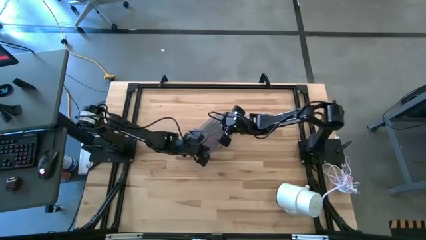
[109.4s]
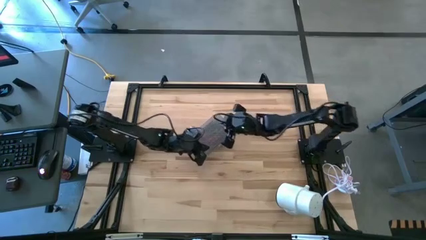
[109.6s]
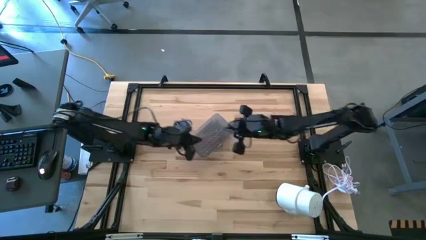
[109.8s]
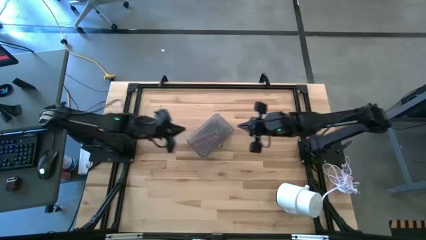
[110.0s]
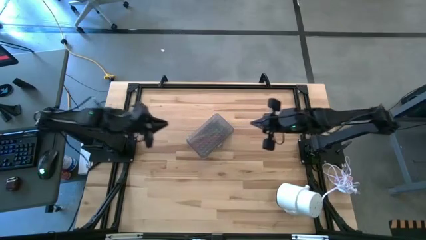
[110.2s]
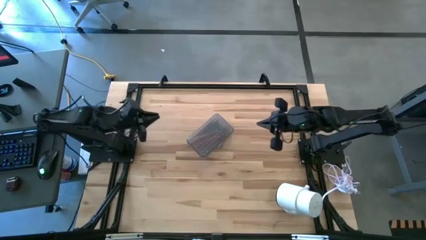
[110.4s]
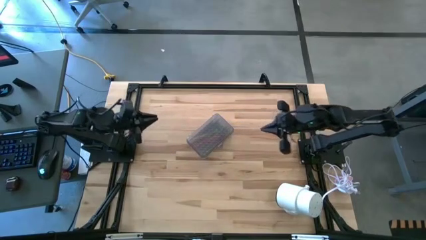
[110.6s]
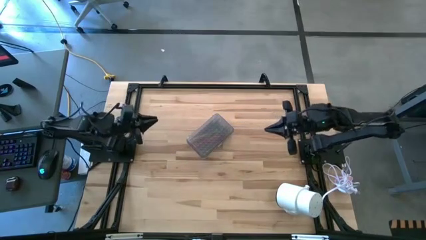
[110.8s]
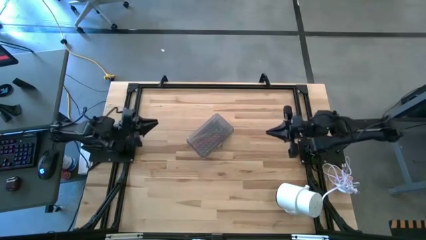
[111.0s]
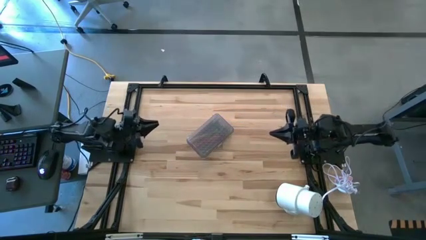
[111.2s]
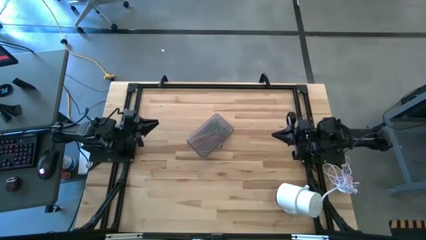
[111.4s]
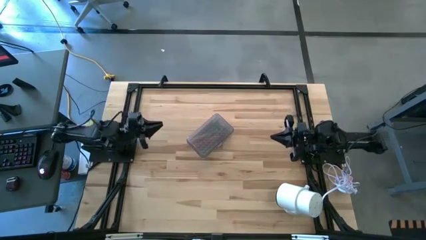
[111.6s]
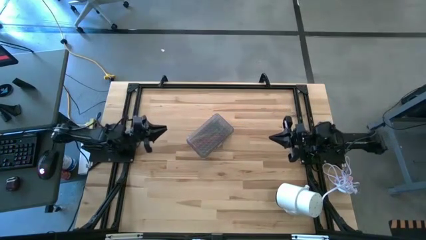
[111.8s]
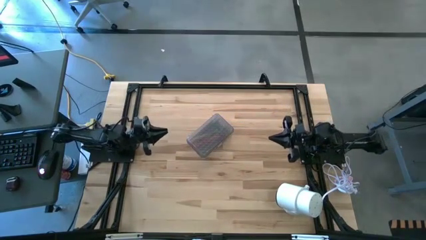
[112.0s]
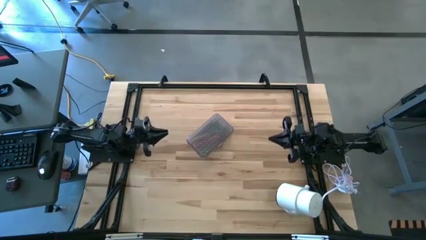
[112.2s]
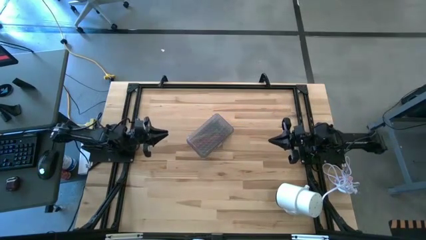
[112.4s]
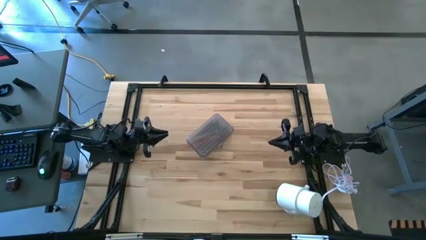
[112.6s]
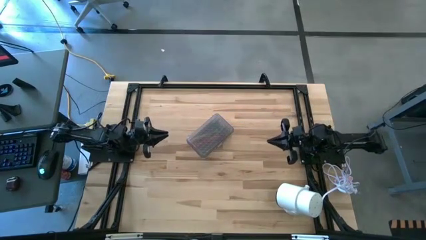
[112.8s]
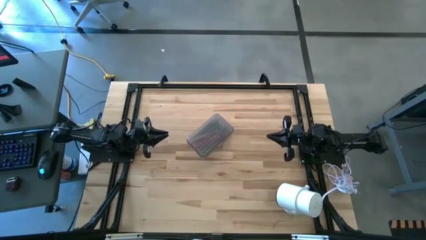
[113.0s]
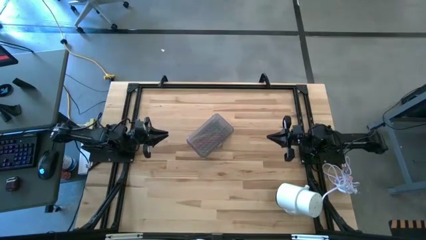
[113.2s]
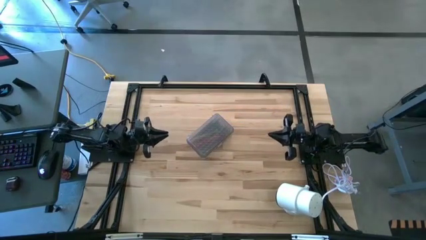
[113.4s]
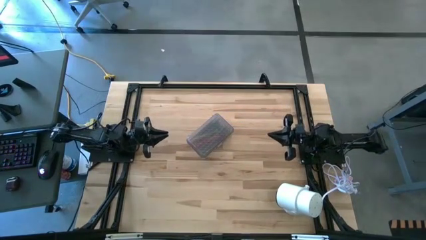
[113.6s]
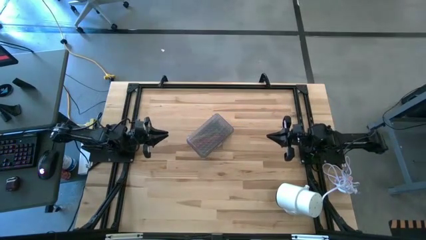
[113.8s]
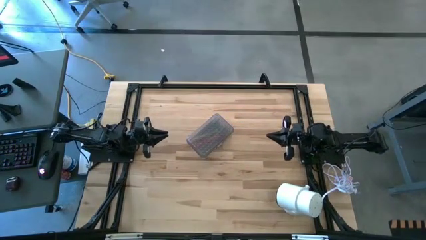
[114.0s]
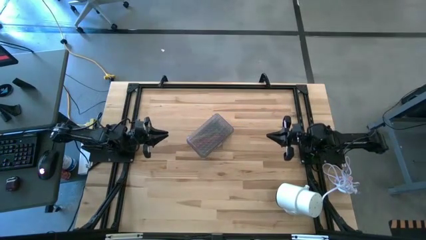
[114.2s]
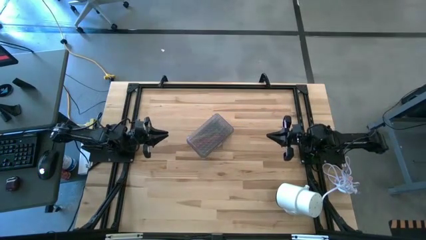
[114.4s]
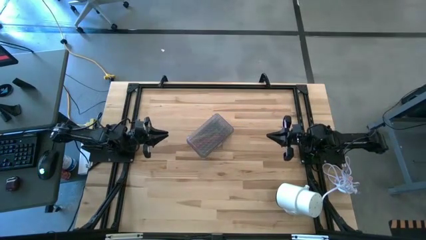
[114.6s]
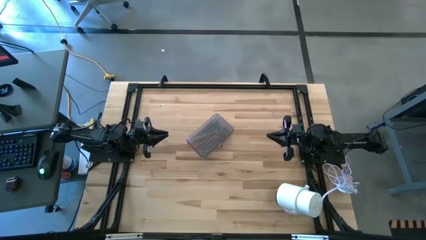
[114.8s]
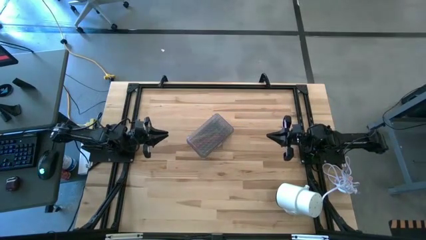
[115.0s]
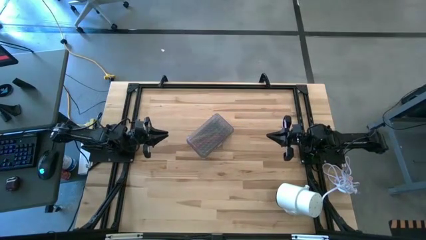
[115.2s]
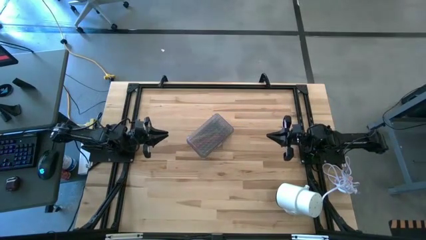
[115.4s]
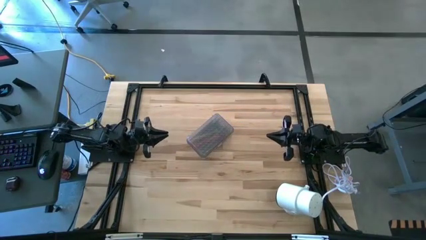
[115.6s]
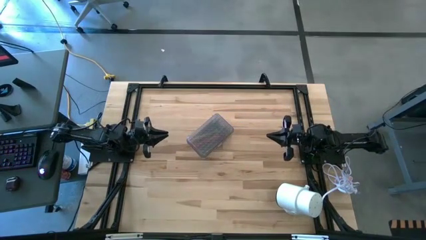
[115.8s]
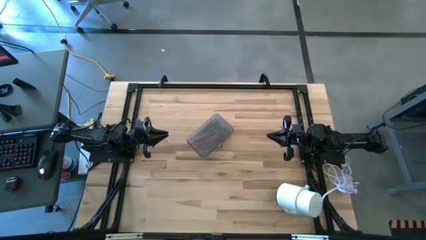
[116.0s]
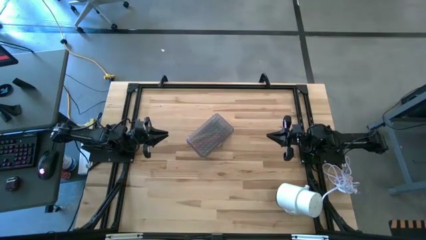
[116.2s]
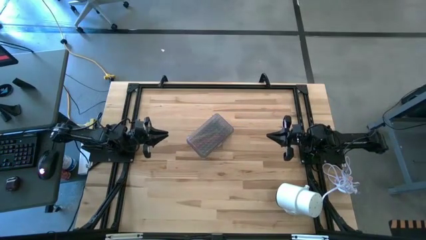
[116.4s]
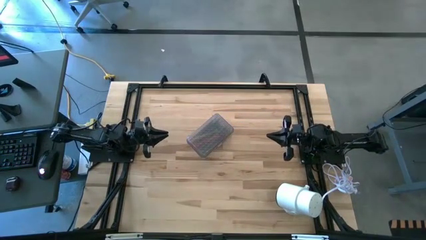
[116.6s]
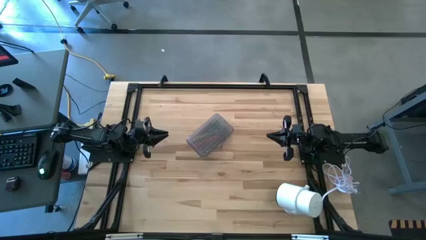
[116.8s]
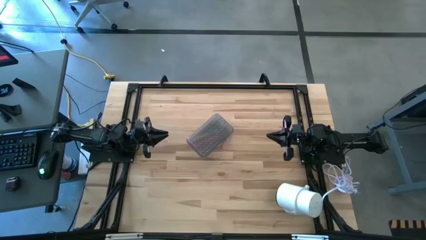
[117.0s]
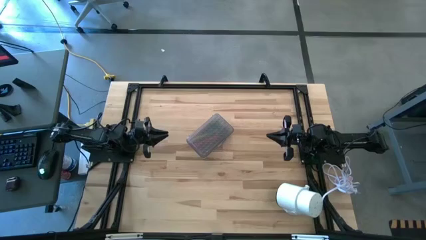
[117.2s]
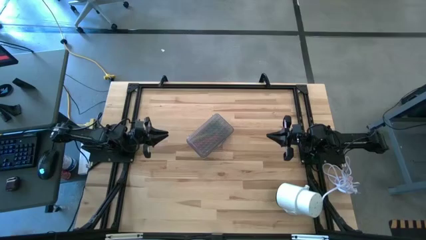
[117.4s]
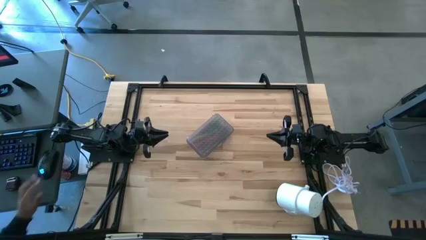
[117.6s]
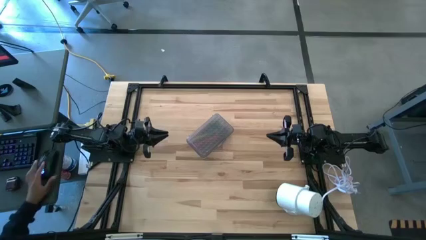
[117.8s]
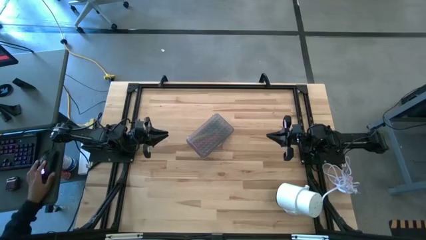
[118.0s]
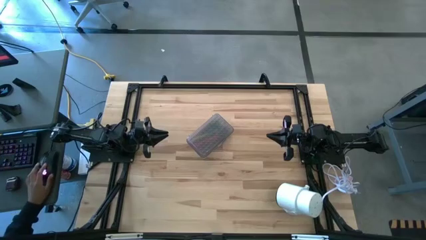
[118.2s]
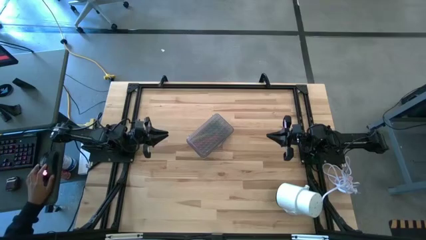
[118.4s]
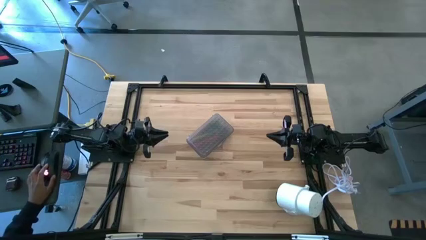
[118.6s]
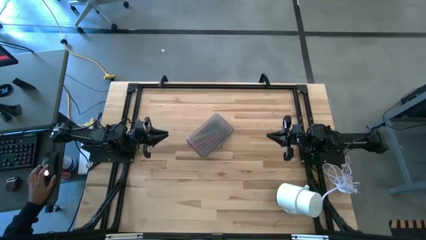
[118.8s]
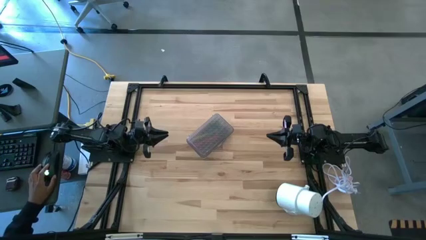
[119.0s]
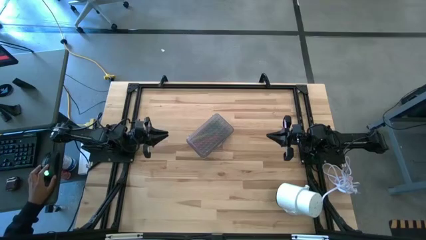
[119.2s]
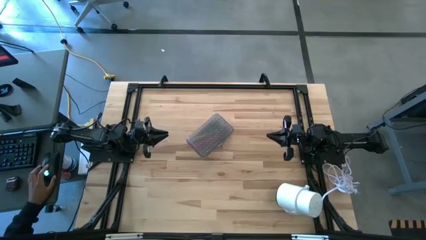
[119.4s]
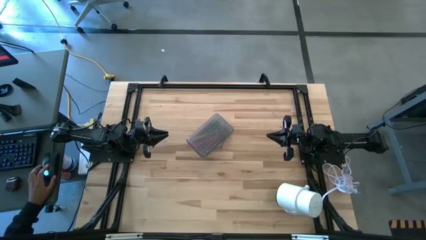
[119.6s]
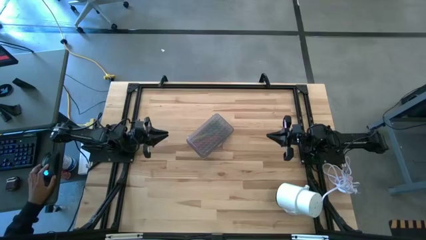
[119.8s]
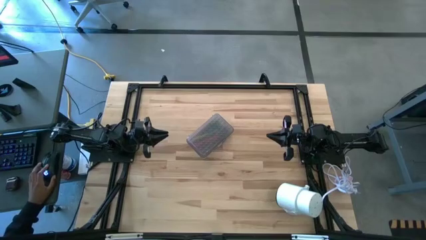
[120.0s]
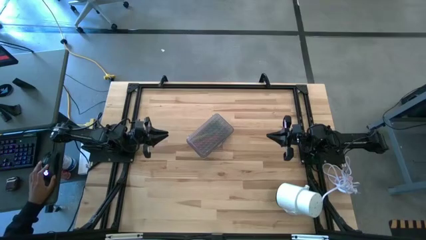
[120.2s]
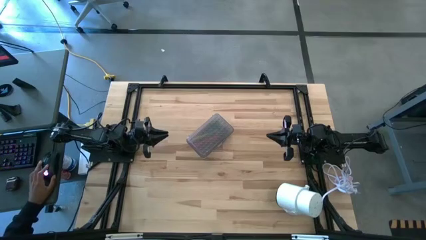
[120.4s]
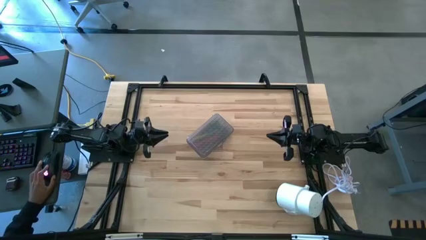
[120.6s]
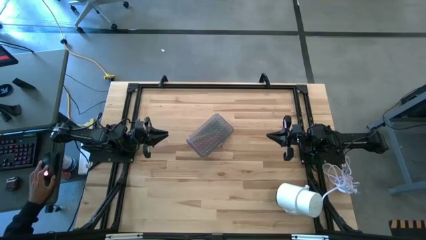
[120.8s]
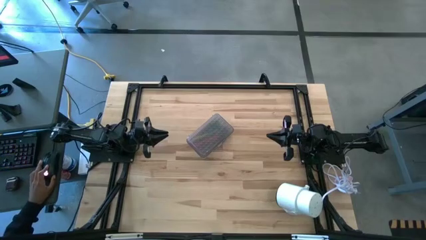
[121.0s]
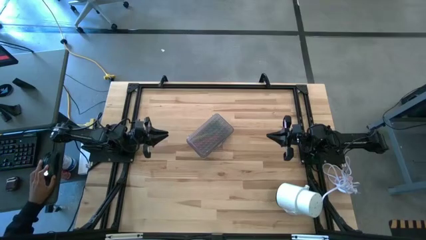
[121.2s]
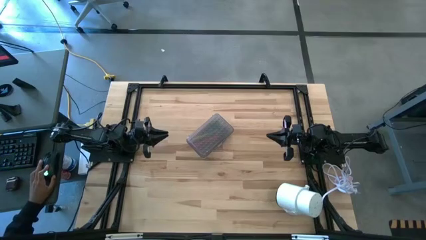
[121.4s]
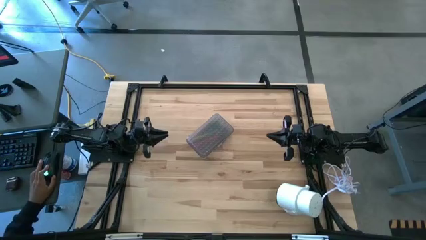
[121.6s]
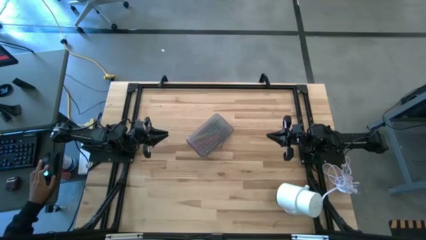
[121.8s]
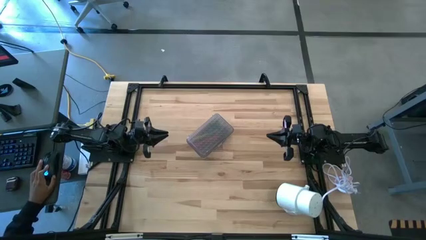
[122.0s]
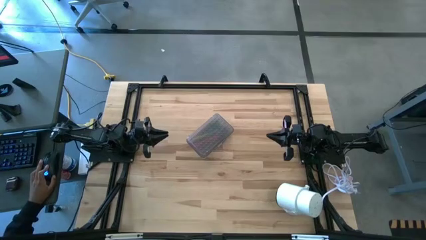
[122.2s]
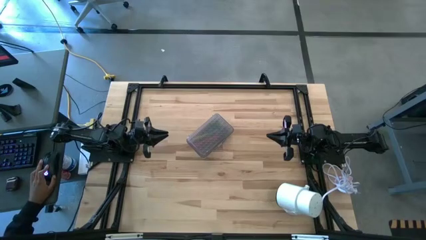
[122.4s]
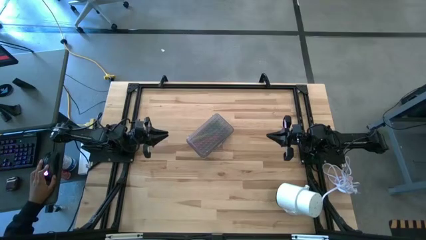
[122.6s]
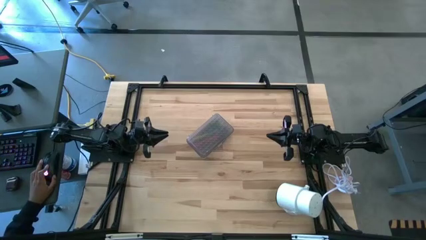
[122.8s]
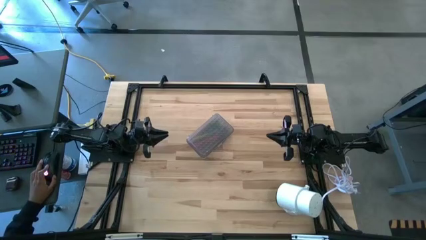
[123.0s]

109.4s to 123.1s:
Task: Pick & place school supplies into a supply box
Return to Home Position
